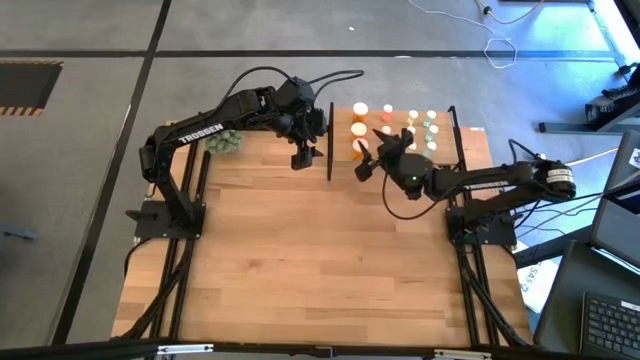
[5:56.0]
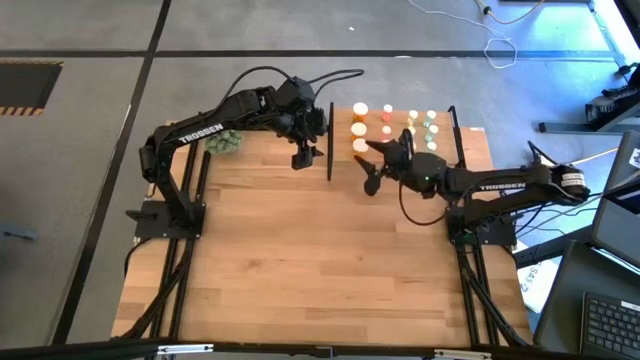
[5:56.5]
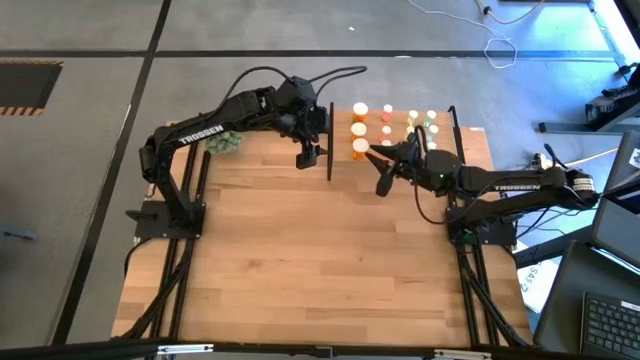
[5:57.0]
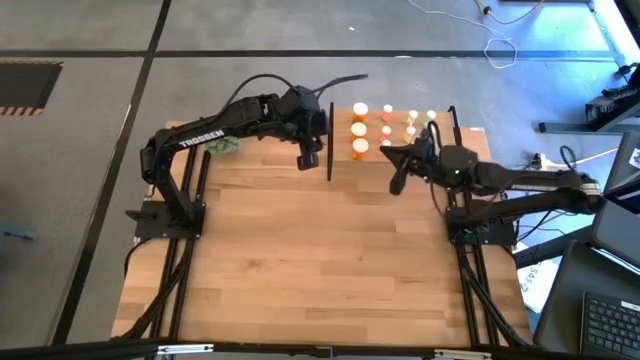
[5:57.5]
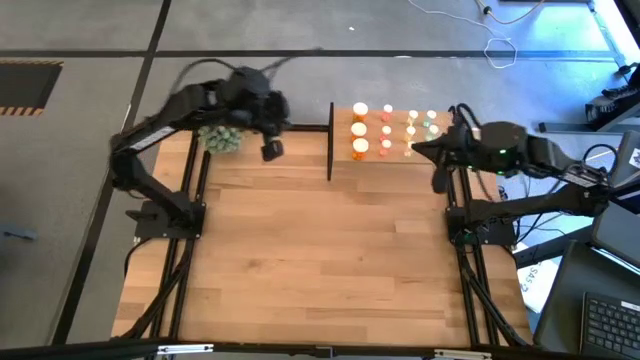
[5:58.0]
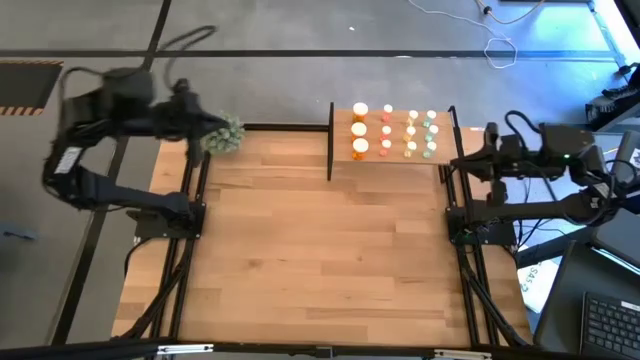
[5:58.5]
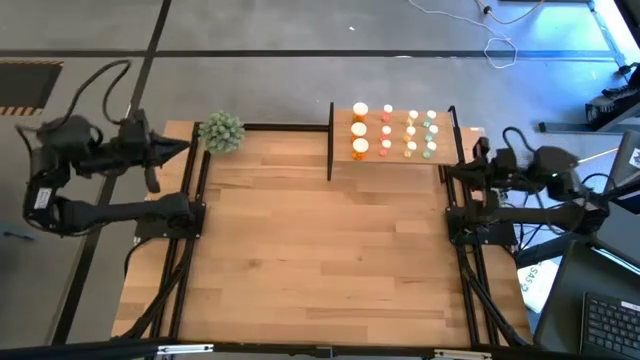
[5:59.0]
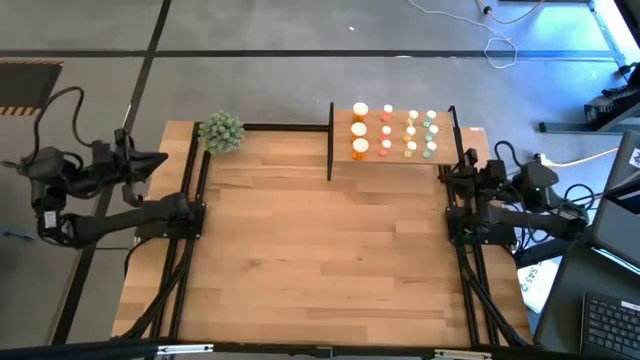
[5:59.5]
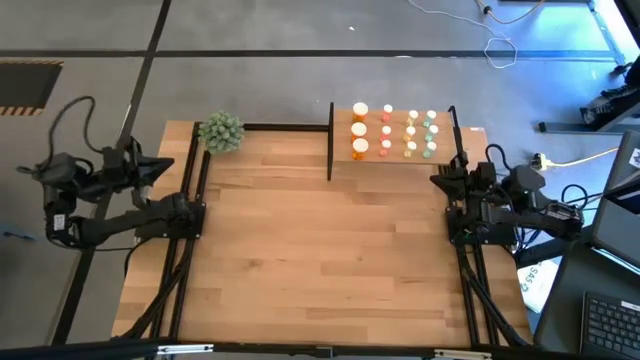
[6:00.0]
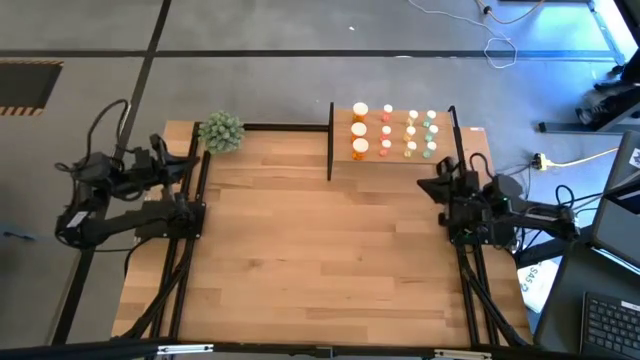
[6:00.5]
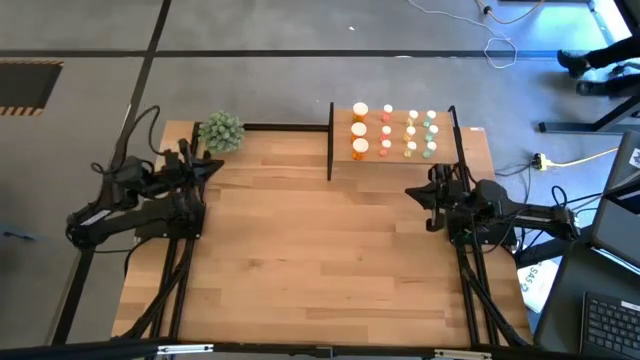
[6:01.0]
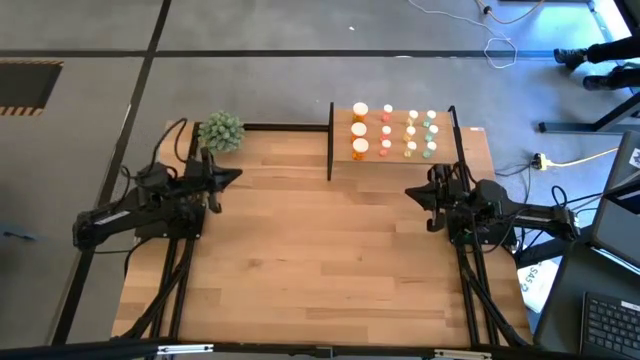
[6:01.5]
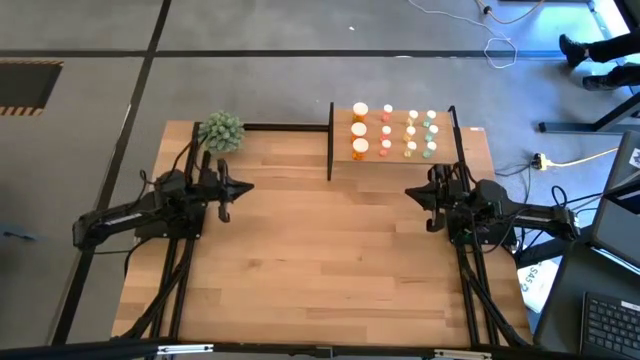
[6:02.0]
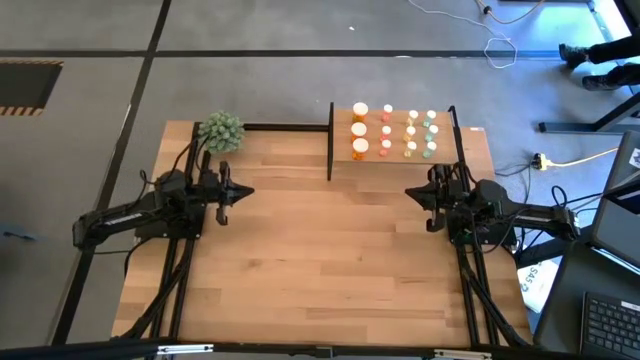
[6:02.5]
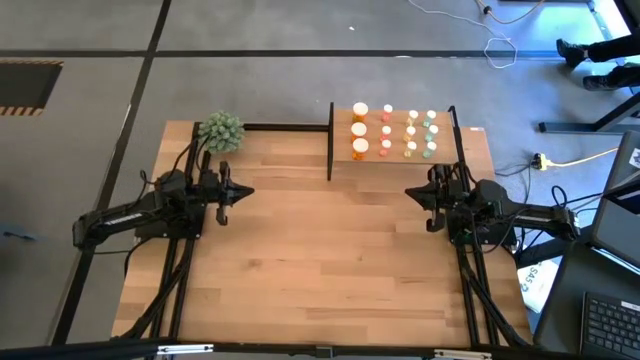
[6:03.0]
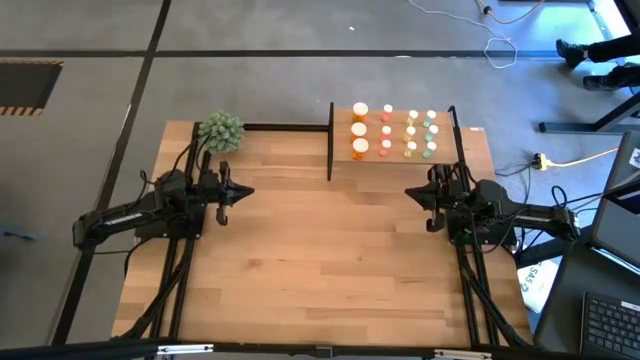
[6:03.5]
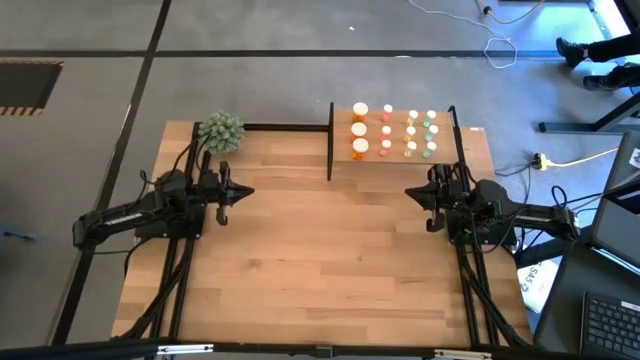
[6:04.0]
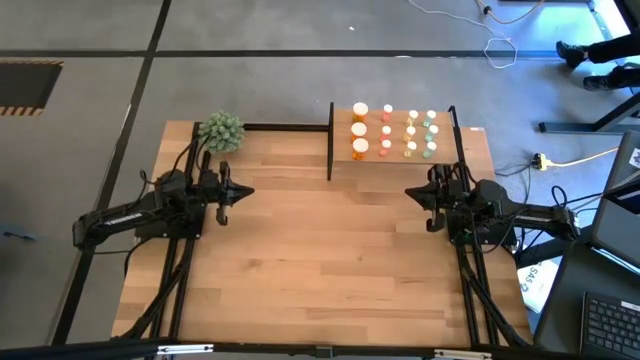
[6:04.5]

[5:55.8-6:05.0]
Task: Pick and place medicine bottles onto shelf by color
Return to Home Position

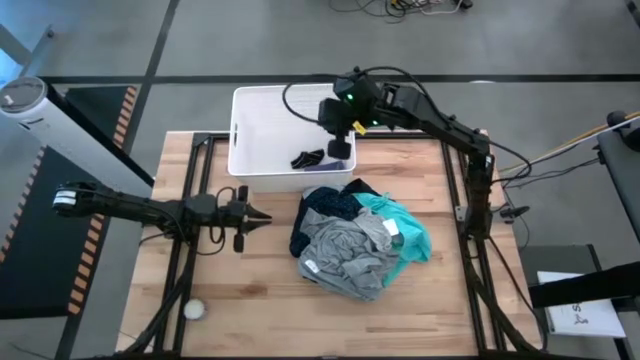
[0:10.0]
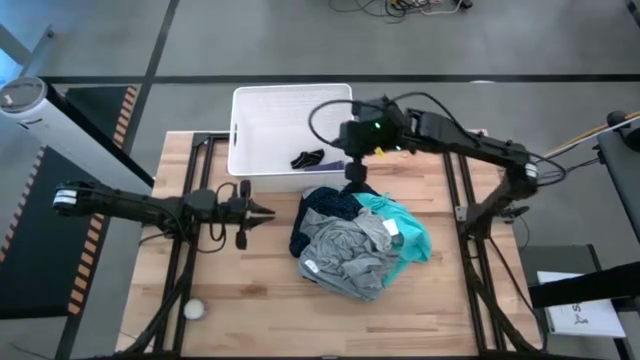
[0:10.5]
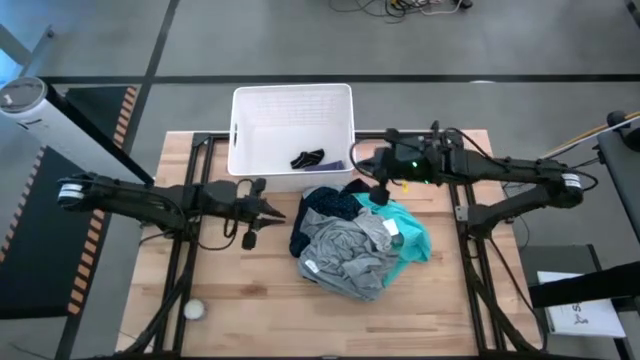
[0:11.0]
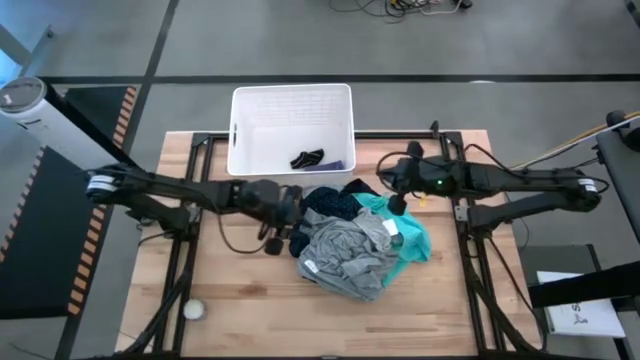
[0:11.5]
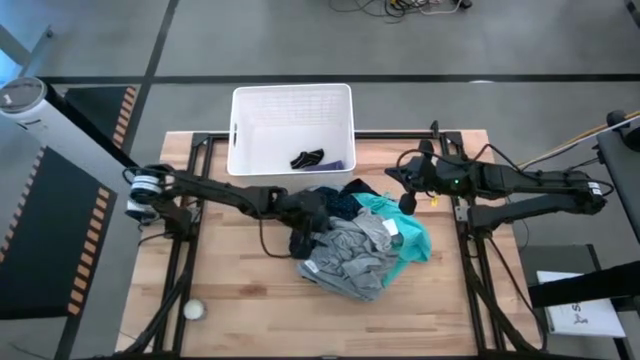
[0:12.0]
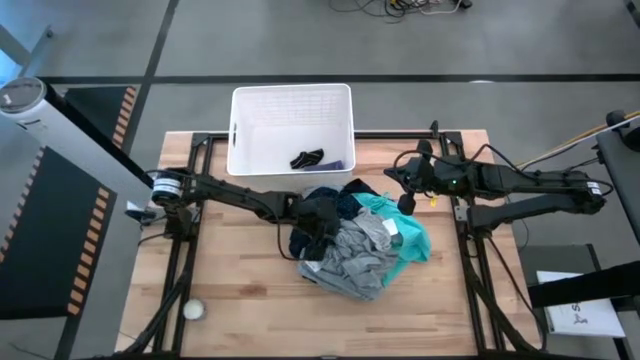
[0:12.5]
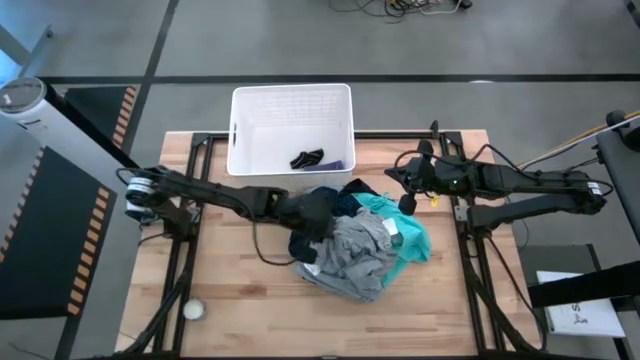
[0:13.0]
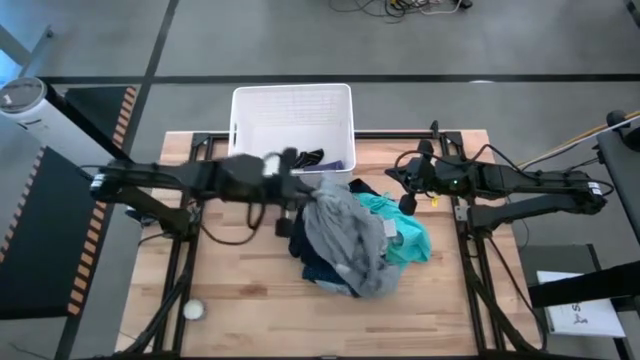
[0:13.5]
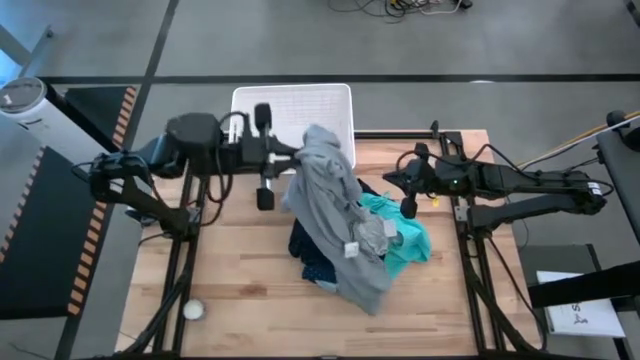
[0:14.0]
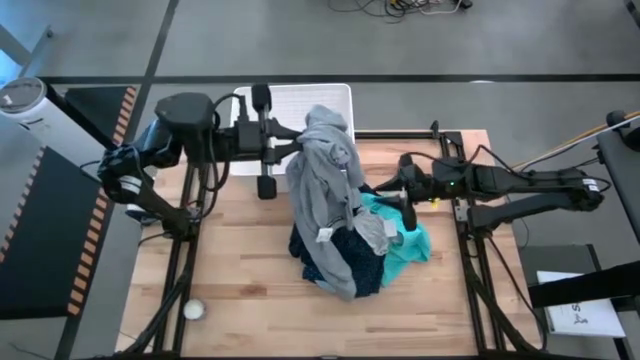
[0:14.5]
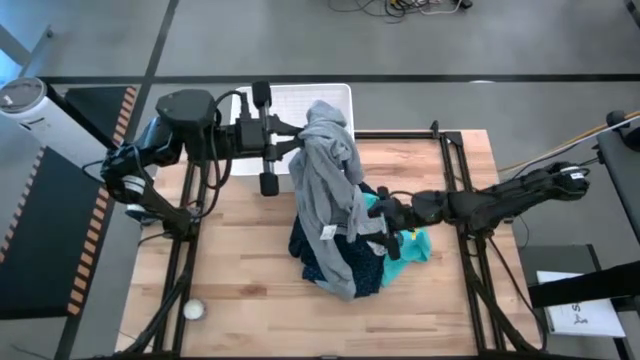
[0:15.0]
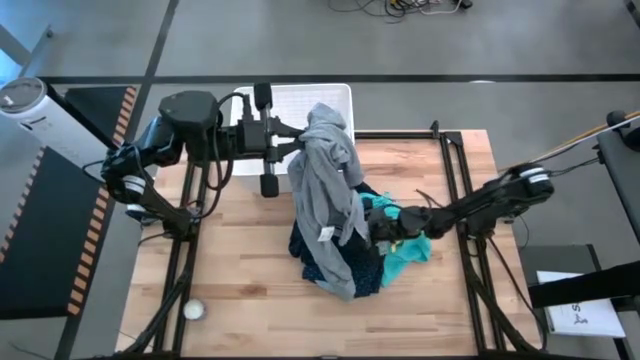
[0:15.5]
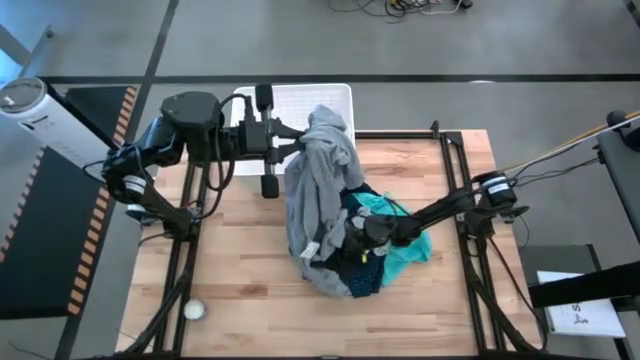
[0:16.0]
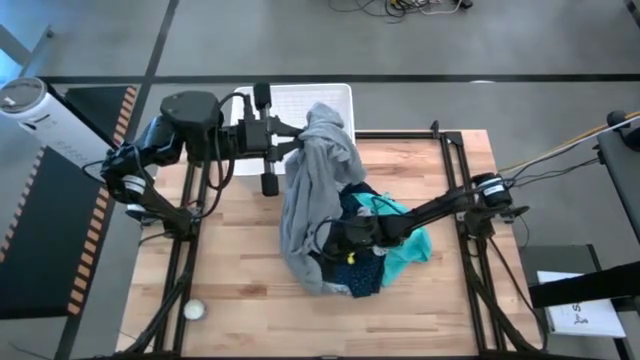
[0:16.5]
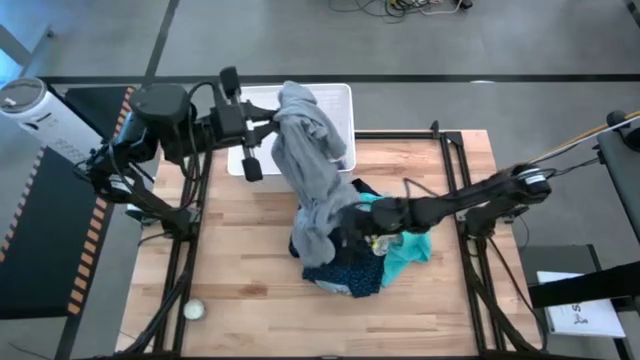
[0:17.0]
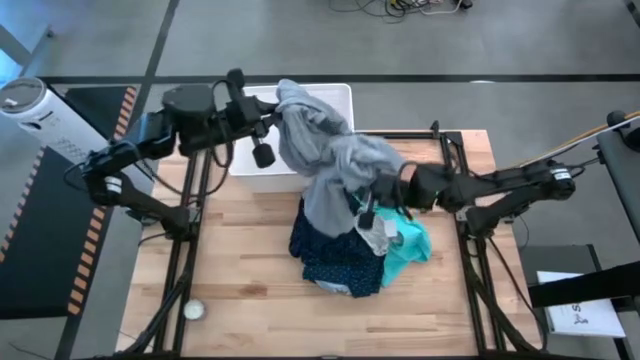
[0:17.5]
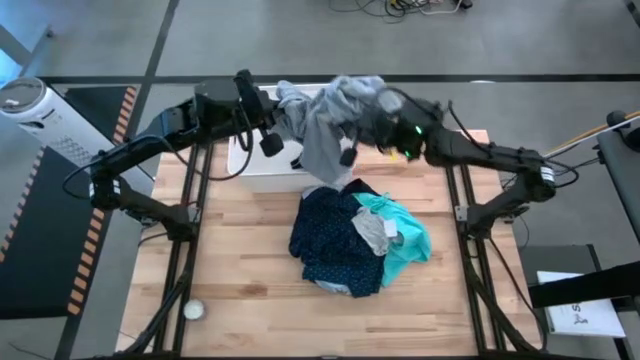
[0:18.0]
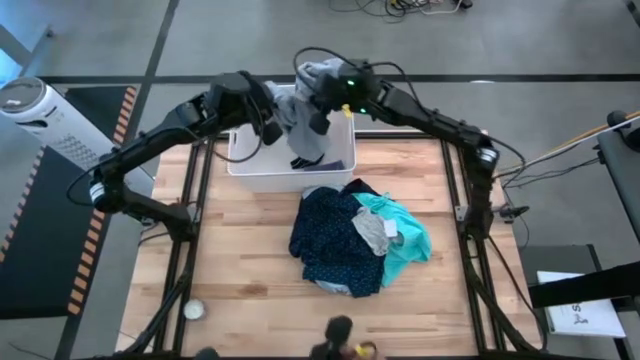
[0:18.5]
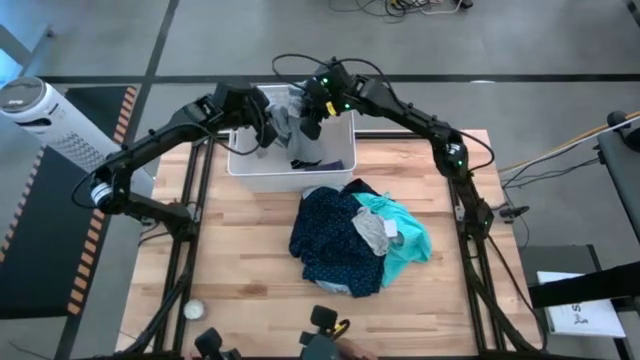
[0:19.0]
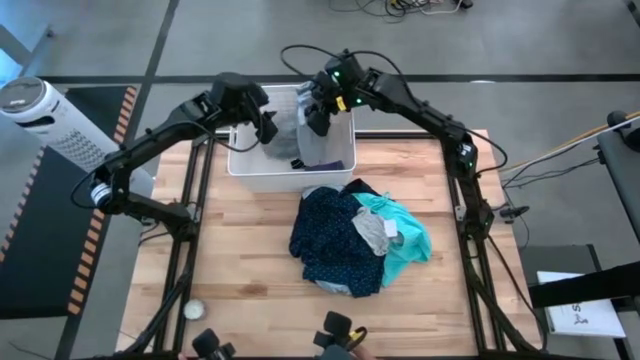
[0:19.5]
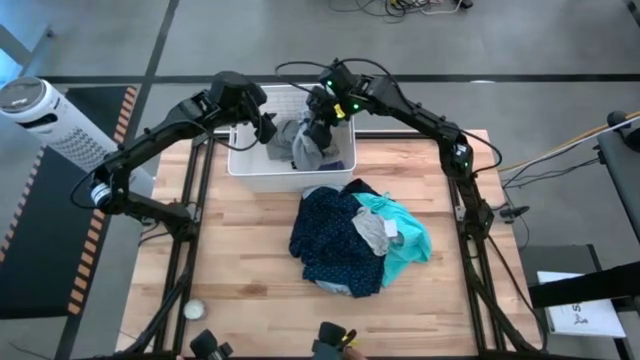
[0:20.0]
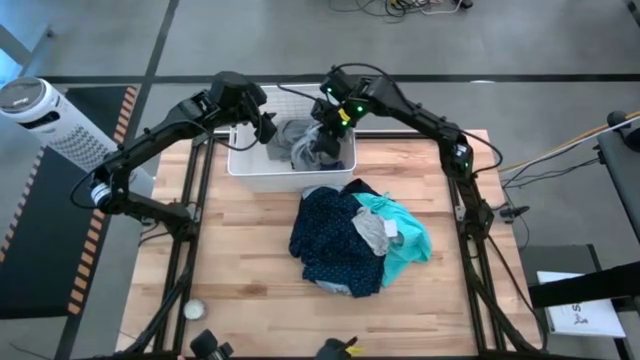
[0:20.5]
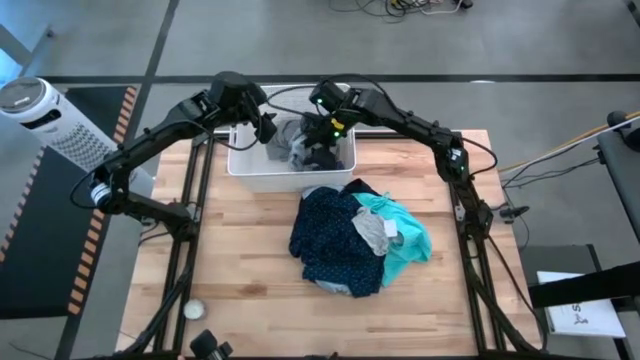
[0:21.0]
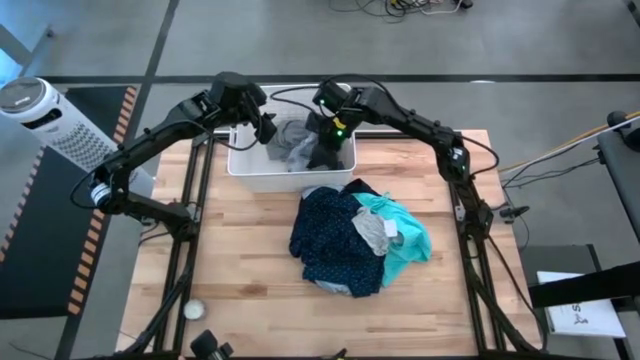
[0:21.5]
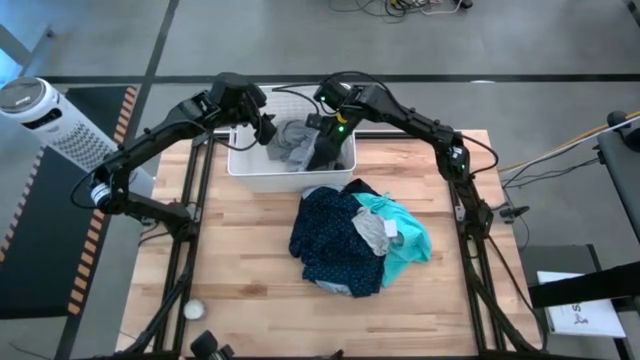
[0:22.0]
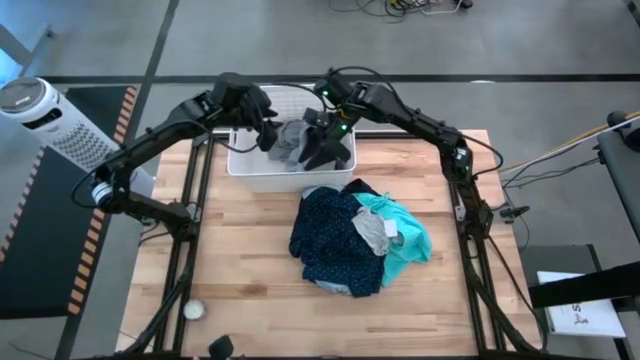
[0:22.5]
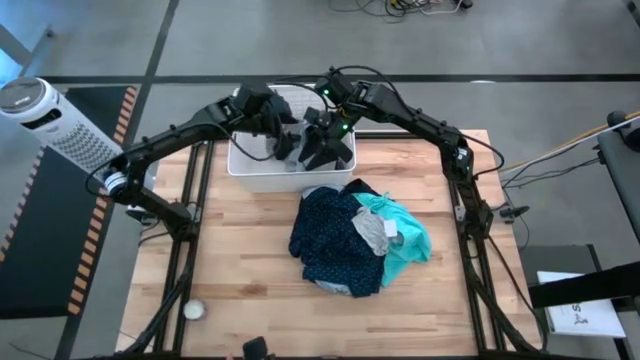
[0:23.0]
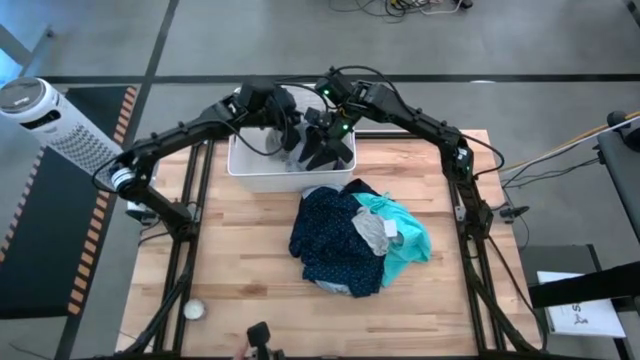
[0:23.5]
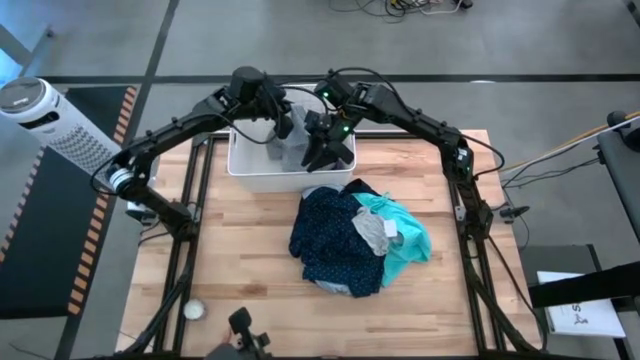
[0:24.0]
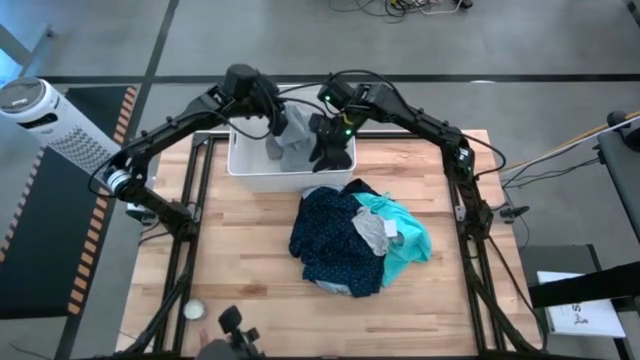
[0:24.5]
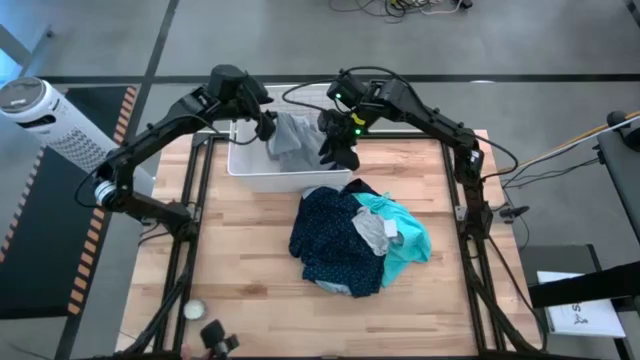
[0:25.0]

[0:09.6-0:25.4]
Task: Sort clothes
Put the gray sweater into the white laundry bin
